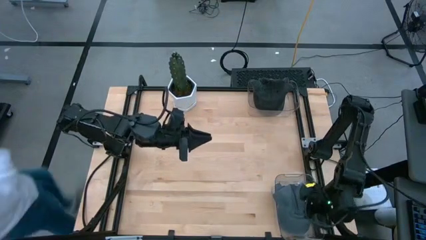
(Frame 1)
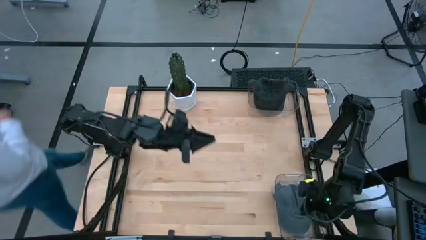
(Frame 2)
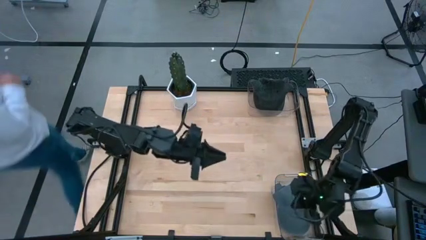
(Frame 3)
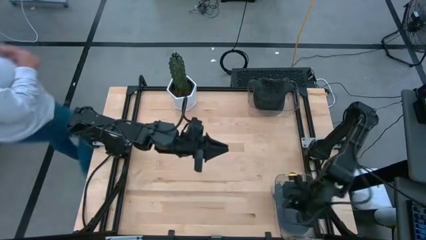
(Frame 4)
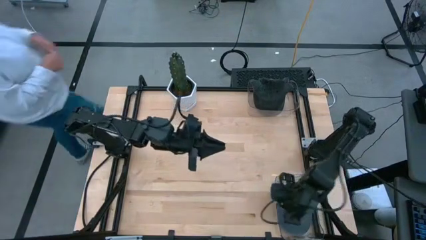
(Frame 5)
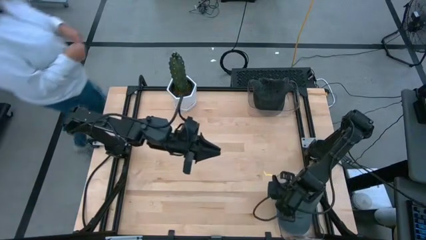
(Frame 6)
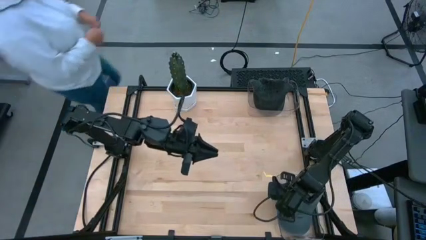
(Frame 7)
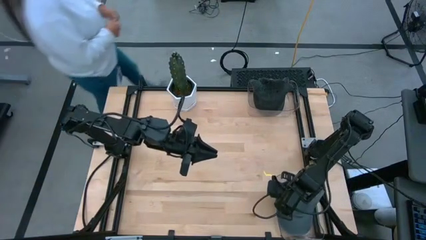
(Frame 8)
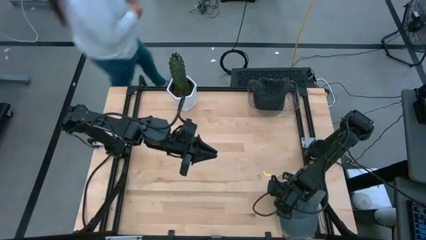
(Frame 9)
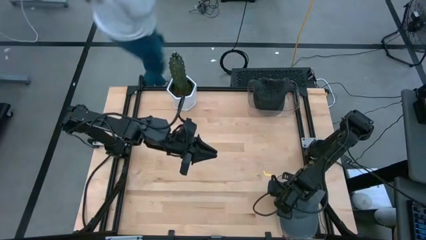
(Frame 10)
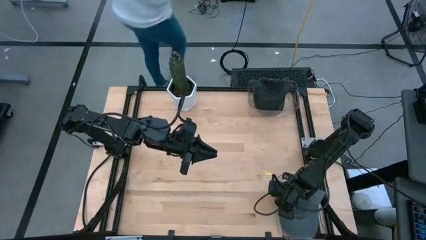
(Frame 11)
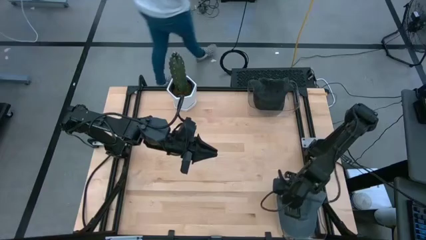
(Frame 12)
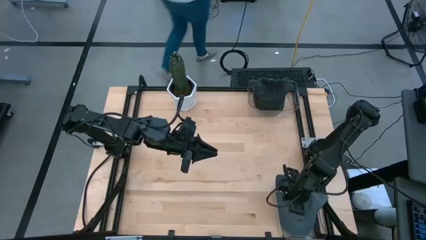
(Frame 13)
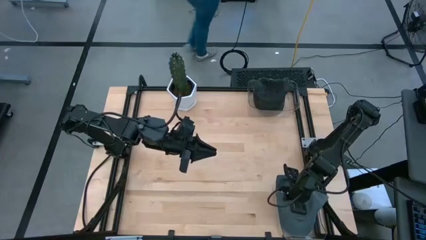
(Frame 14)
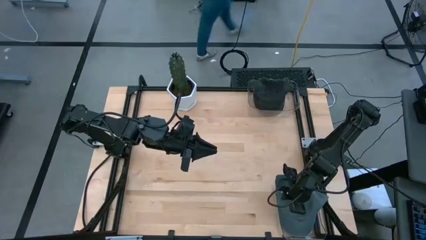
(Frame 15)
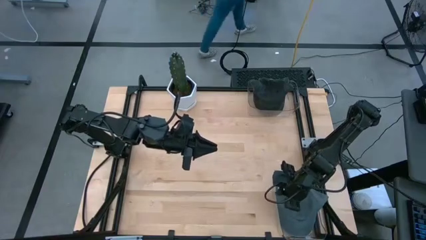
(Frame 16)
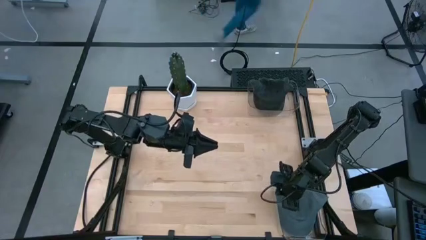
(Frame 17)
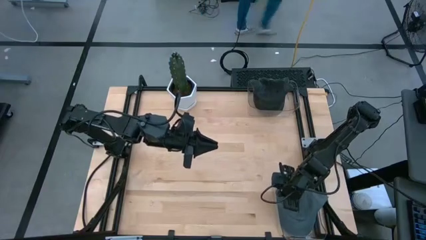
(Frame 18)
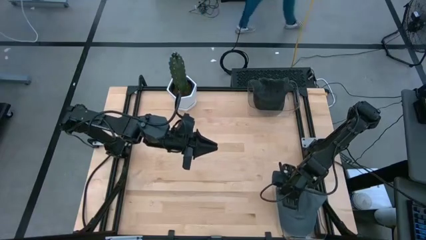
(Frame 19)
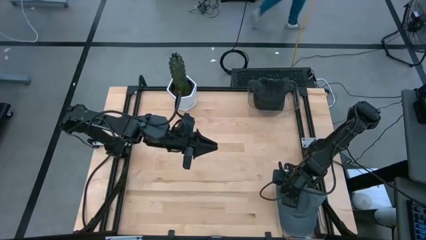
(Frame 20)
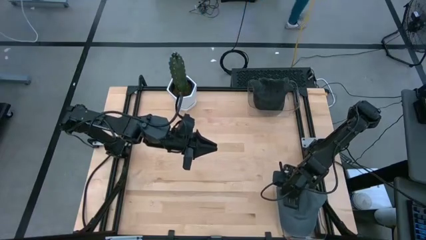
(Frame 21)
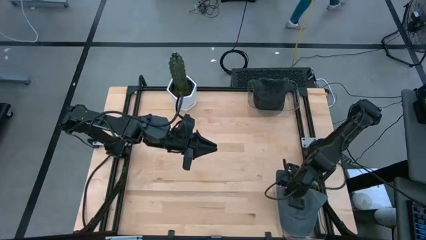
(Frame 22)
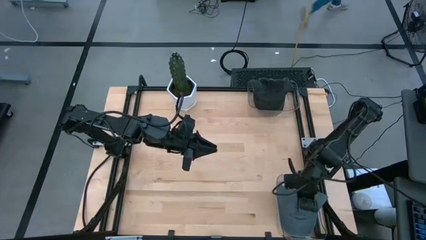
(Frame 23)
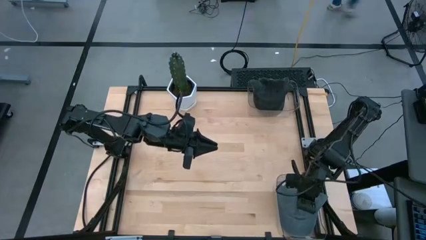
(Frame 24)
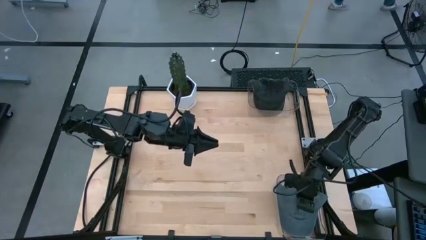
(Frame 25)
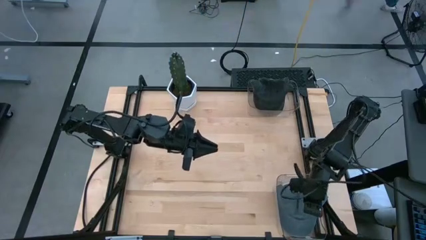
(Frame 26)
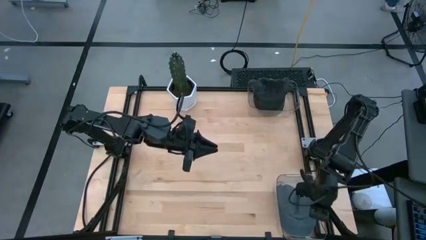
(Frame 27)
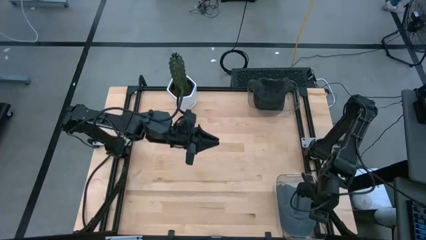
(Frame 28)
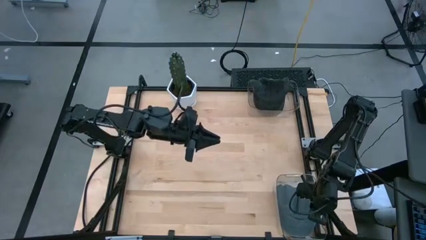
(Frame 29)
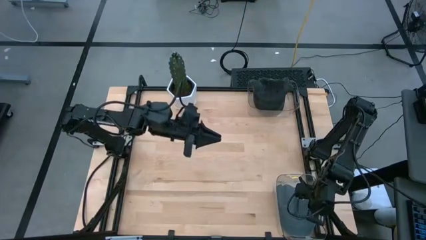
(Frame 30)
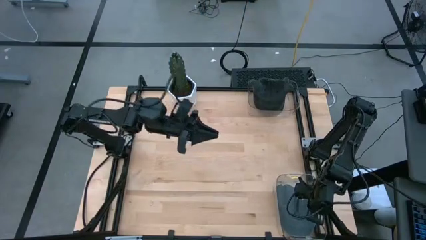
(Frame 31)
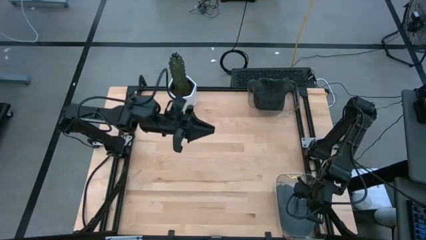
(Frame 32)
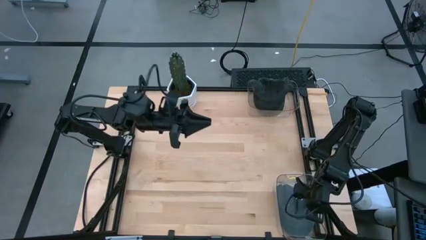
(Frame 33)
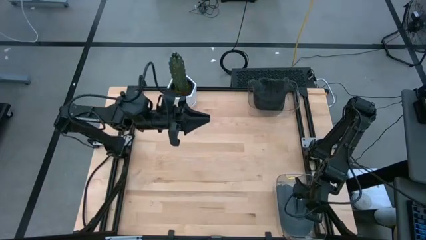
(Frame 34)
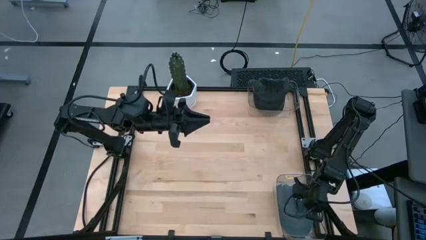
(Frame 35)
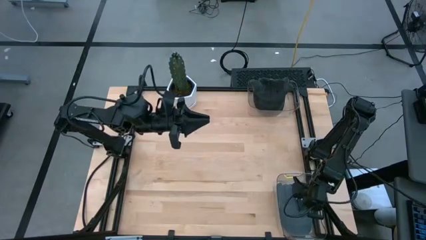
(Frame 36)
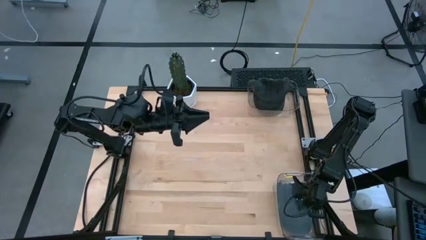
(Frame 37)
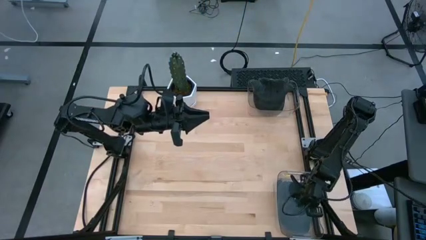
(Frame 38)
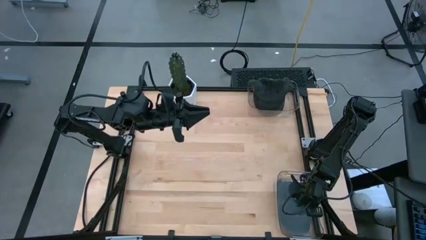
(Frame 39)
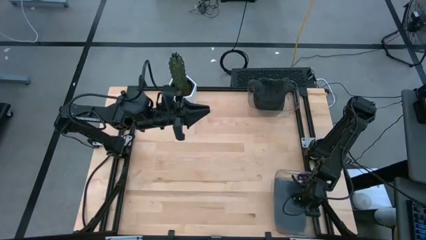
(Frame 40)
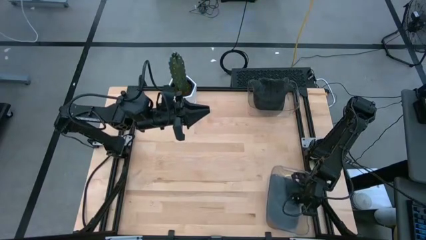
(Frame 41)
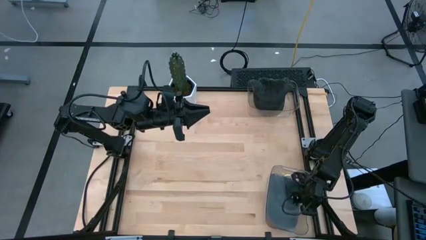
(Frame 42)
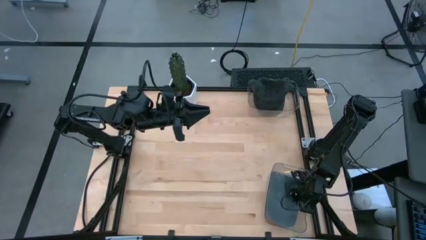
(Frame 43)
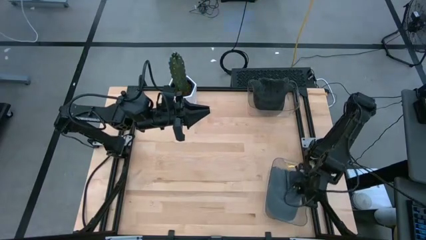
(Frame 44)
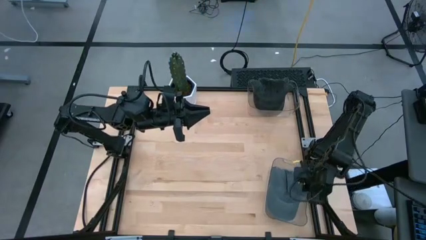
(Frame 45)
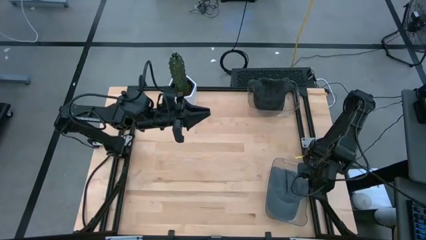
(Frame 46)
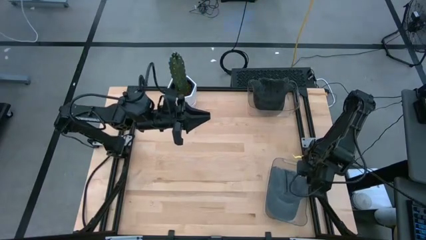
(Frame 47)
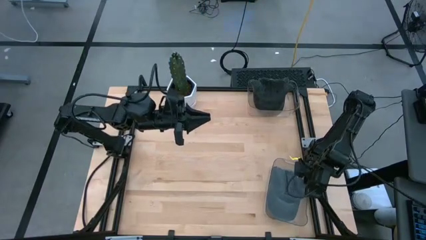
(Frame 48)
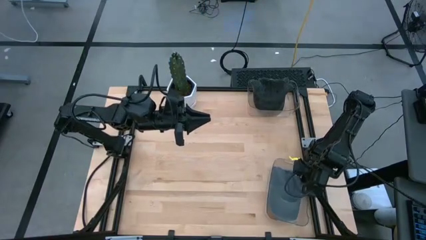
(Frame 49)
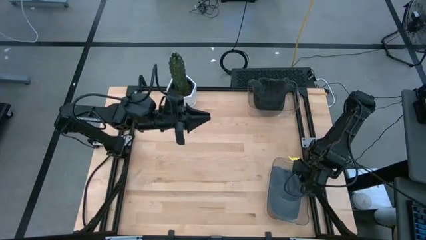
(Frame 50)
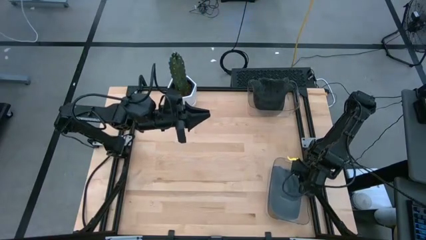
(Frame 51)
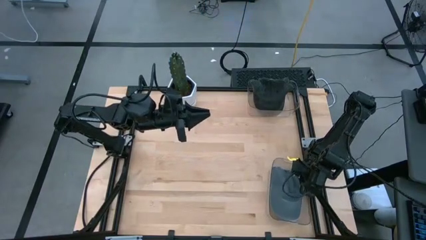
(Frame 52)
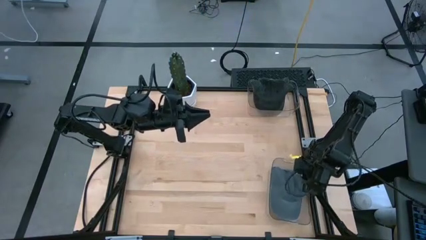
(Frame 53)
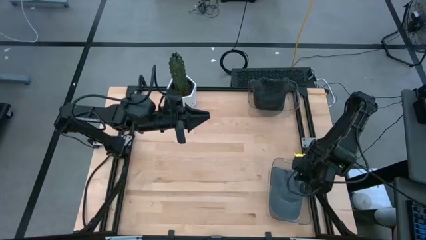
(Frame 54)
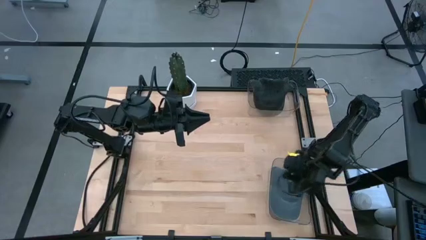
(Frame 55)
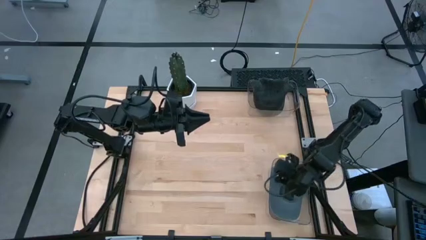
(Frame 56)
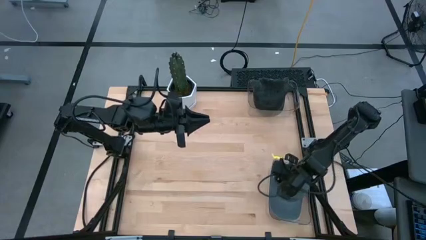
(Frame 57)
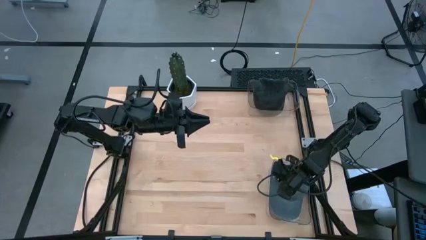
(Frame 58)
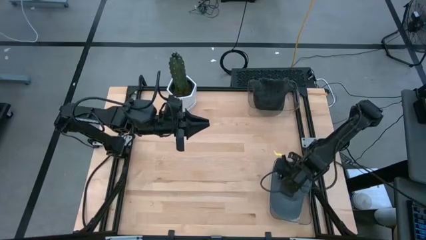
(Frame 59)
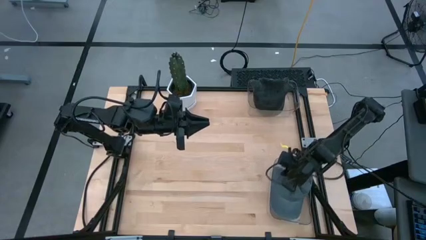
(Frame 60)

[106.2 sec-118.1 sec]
Task: Pick & Place hat
Put the gray cap into the bottom transparent bin

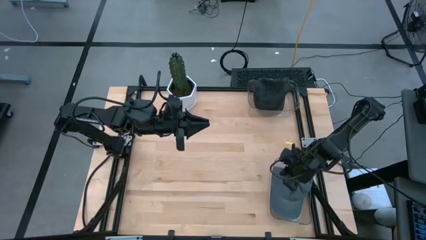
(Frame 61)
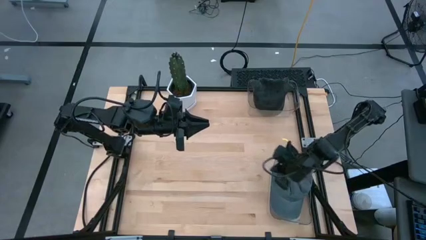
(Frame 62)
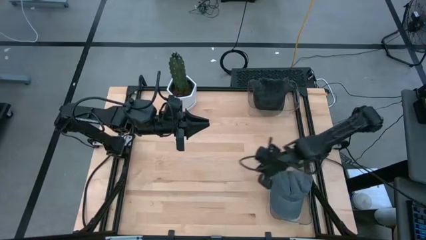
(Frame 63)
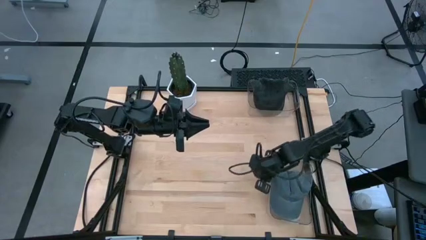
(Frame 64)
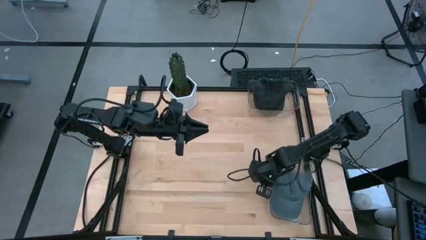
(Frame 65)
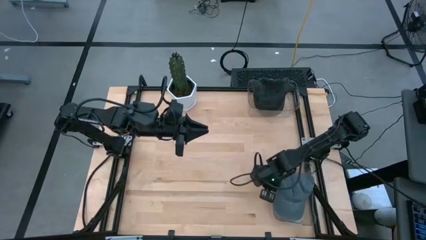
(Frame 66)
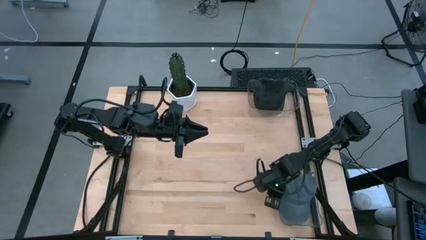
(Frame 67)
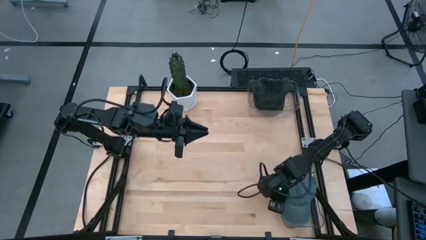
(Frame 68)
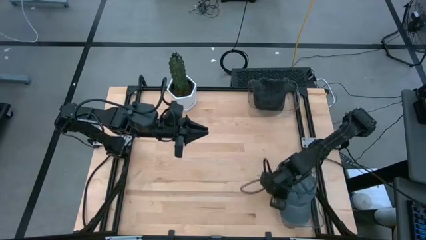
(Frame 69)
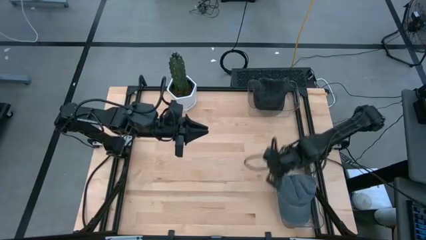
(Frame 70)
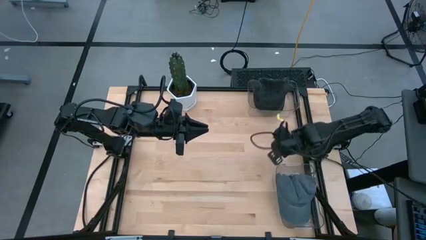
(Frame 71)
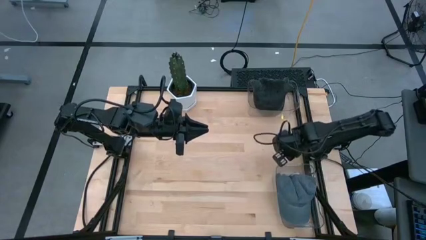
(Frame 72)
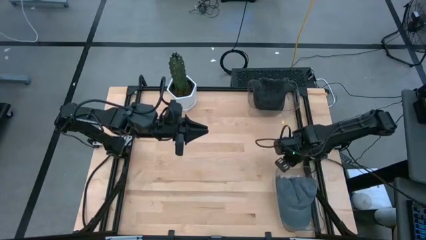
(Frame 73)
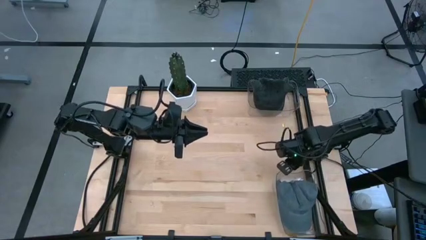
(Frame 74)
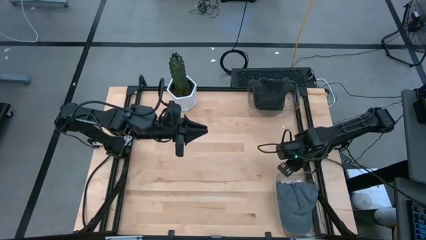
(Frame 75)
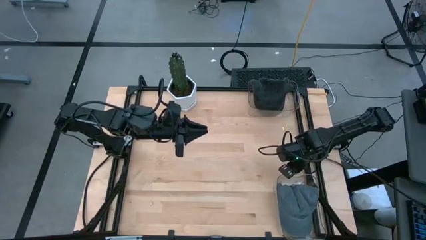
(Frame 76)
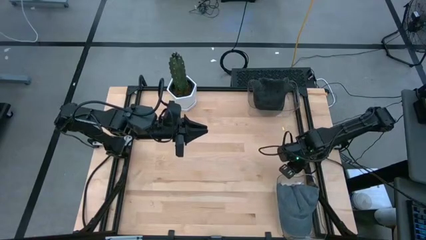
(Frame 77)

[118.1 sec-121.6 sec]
Adjust the bottom transparent bin on the table

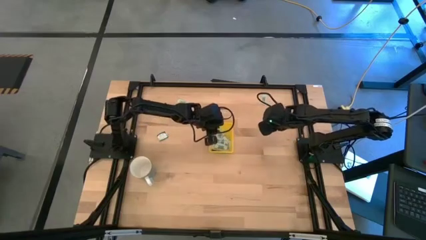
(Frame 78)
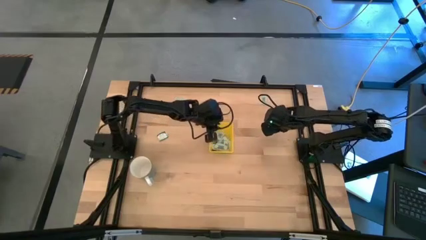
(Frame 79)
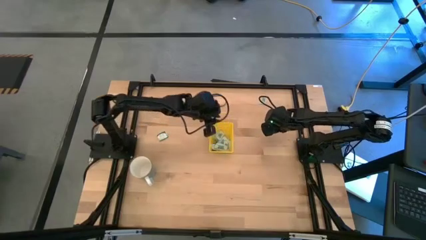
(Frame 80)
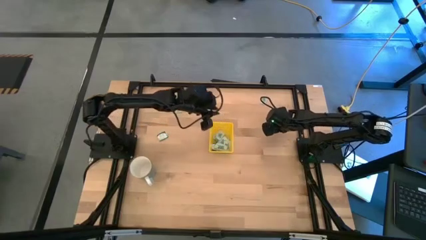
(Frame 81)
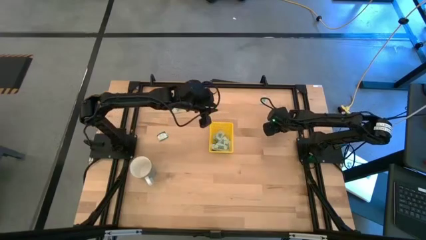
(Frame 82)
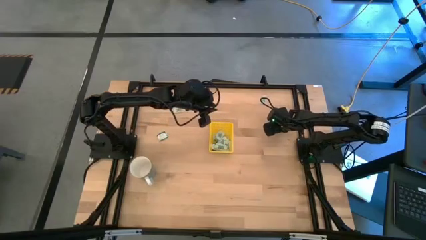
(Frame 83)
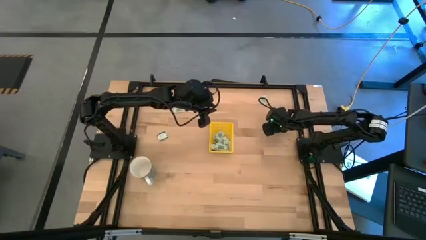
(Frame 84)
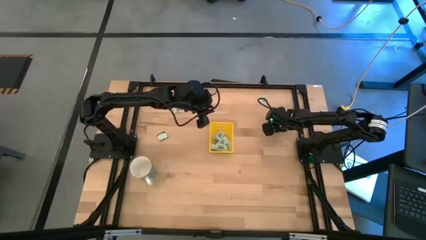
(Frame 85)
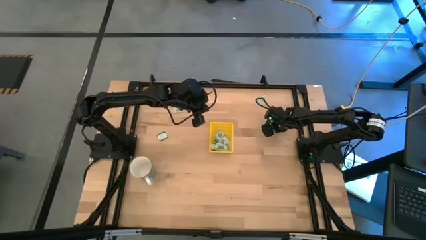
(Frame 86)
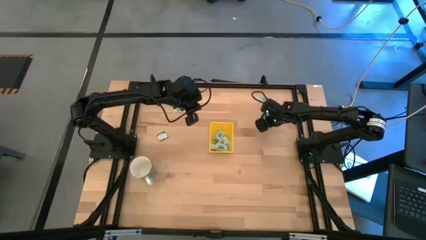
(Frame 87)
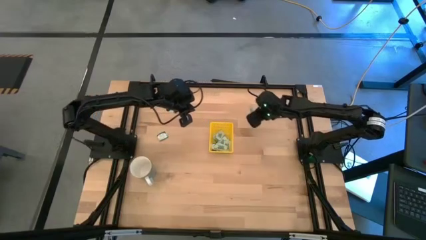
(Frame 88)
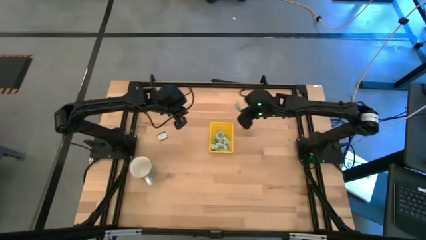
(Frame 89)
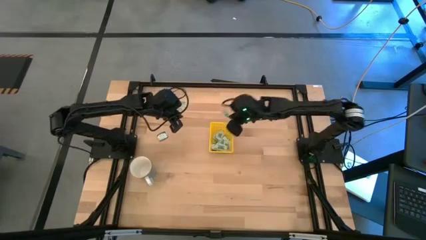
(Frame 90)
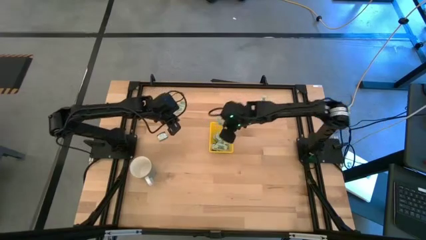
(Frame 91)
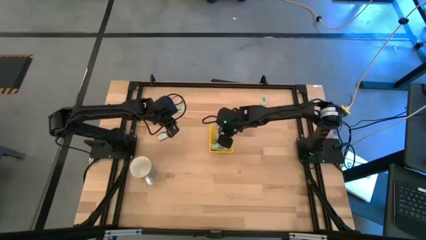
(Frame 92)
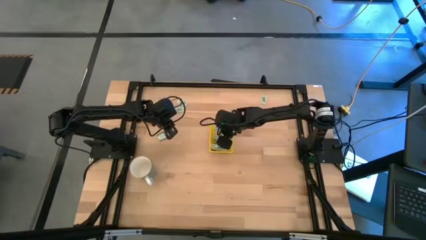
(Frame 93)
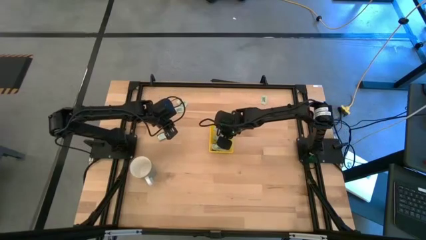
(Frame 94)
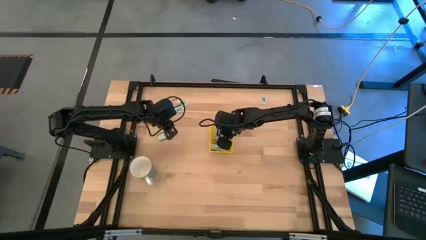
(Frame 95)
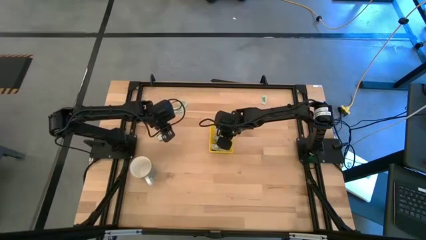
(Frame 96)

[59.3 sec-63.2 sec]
Task: Pick and place Stevia / Truvia into bins
Put the white stevia packet into the yellow bin
